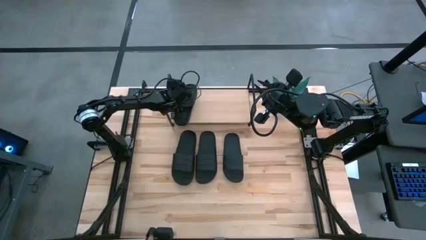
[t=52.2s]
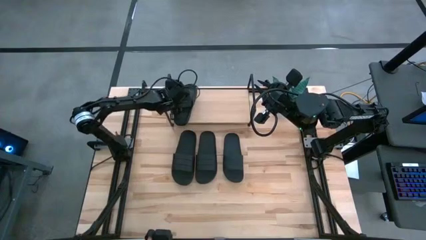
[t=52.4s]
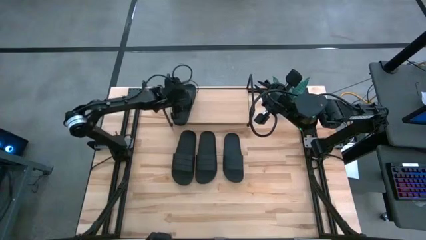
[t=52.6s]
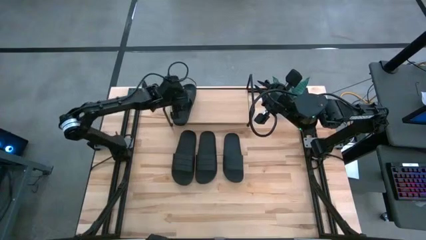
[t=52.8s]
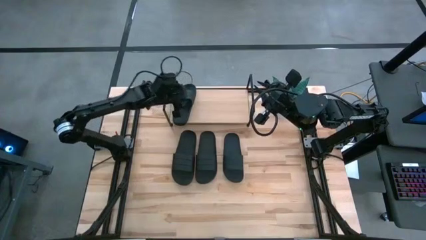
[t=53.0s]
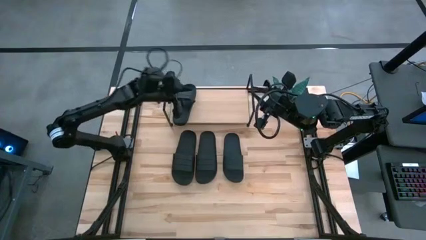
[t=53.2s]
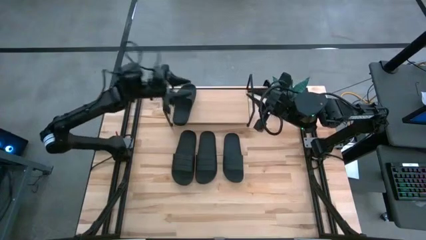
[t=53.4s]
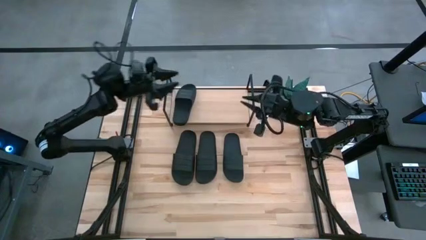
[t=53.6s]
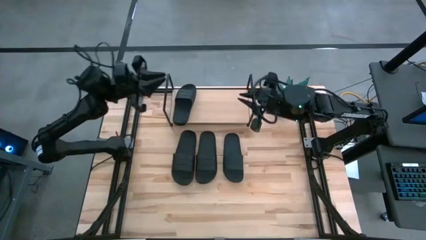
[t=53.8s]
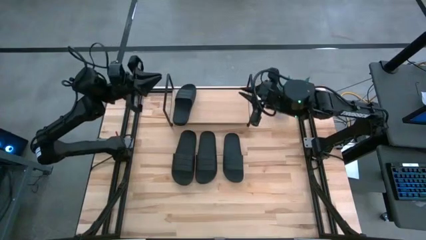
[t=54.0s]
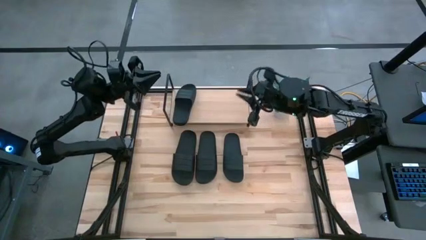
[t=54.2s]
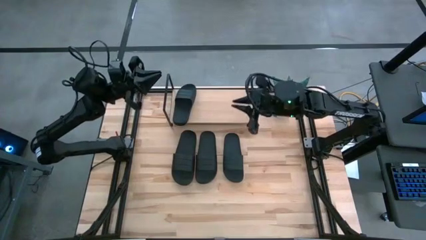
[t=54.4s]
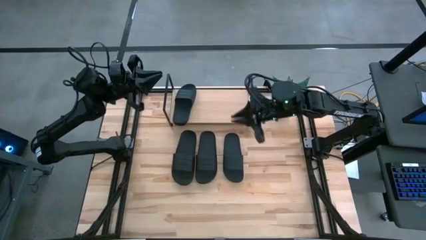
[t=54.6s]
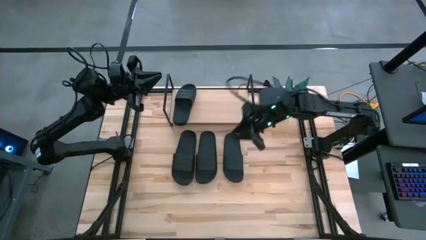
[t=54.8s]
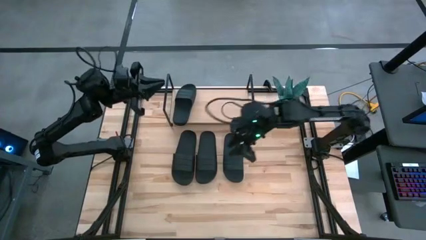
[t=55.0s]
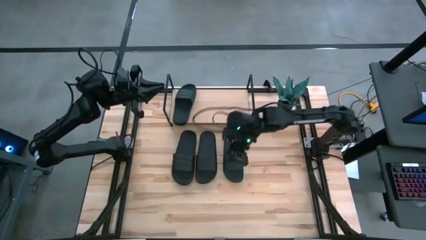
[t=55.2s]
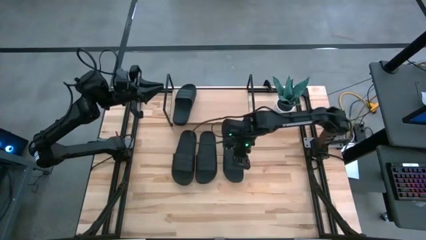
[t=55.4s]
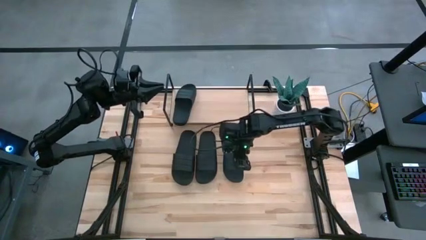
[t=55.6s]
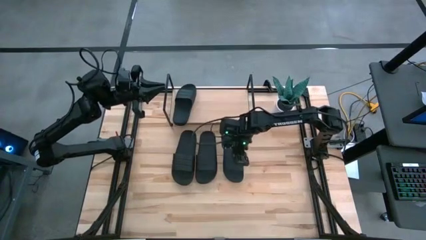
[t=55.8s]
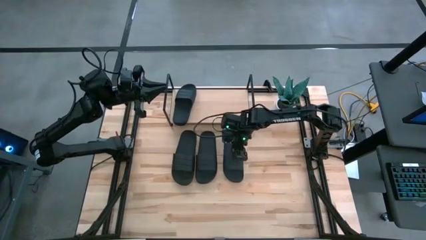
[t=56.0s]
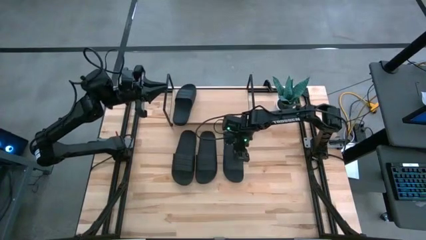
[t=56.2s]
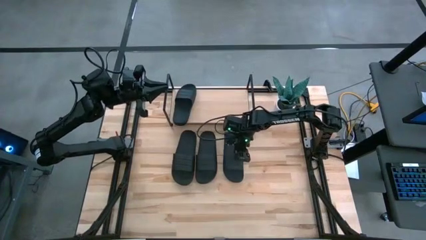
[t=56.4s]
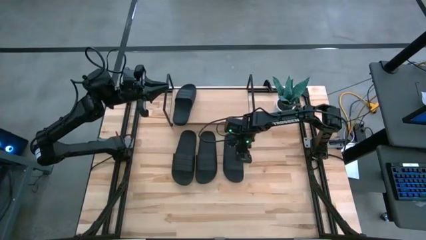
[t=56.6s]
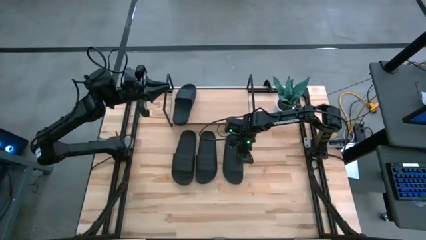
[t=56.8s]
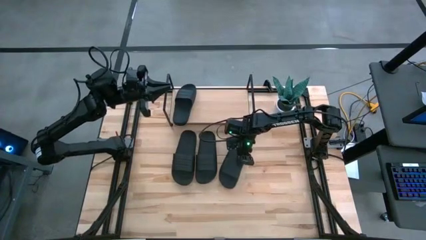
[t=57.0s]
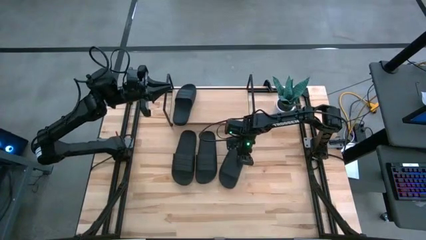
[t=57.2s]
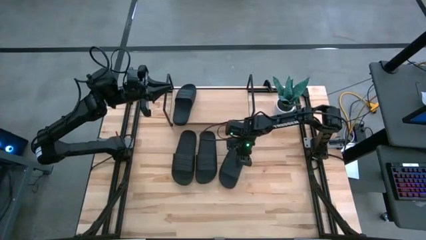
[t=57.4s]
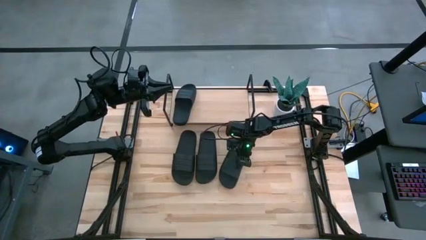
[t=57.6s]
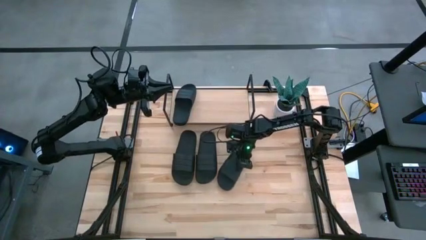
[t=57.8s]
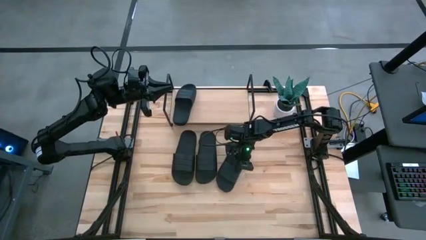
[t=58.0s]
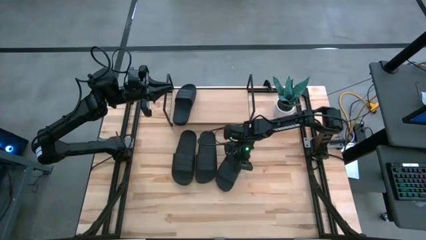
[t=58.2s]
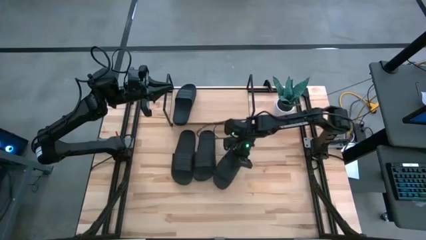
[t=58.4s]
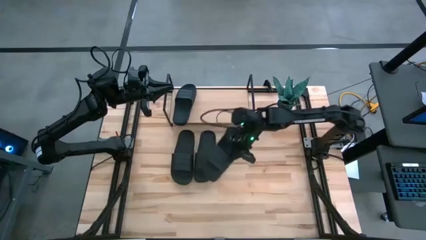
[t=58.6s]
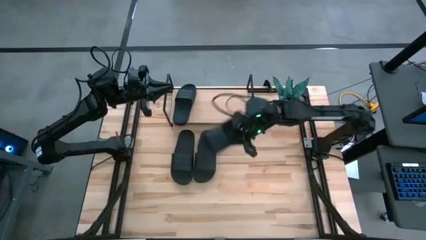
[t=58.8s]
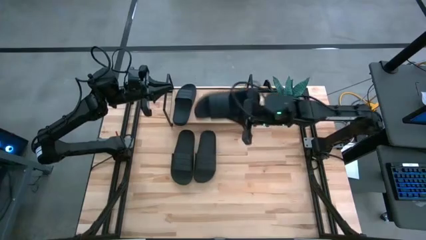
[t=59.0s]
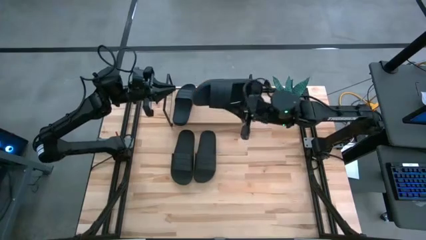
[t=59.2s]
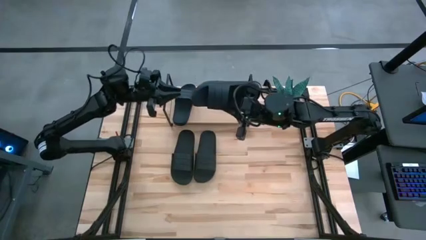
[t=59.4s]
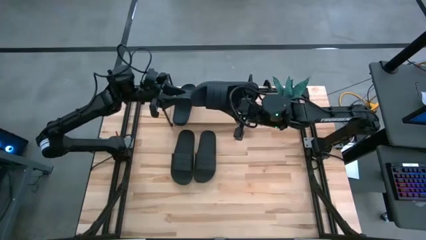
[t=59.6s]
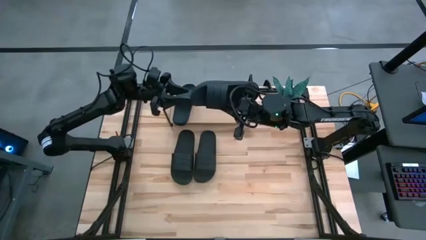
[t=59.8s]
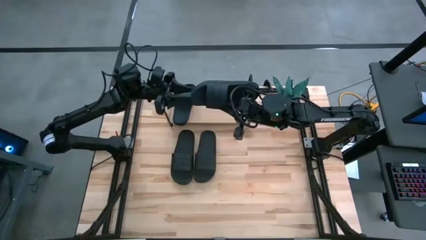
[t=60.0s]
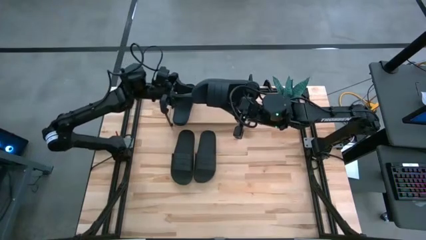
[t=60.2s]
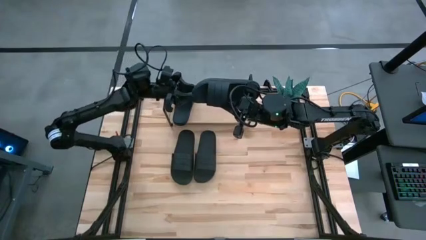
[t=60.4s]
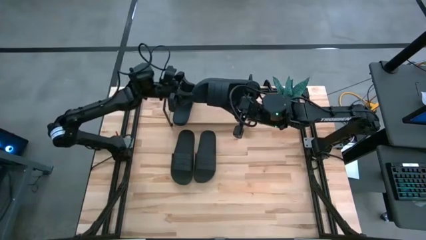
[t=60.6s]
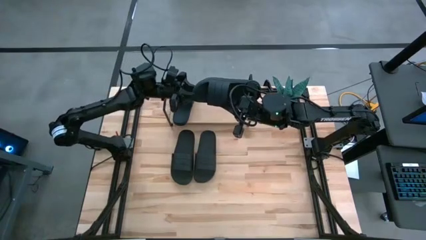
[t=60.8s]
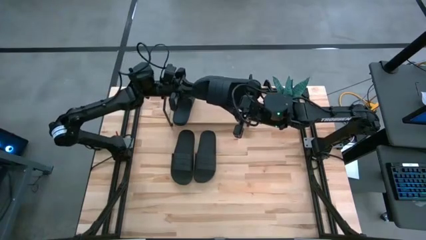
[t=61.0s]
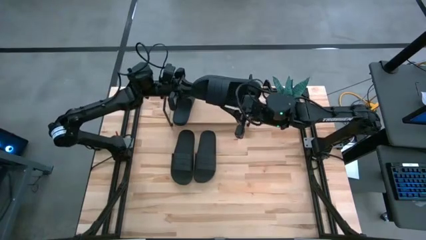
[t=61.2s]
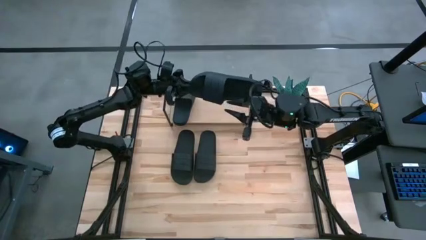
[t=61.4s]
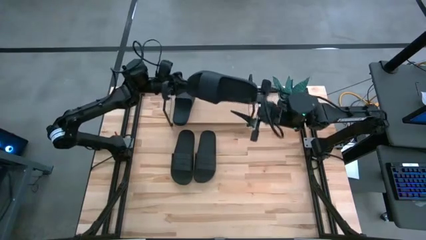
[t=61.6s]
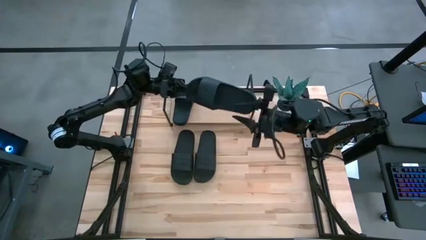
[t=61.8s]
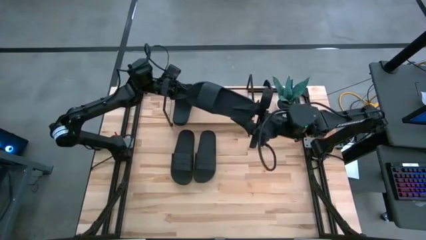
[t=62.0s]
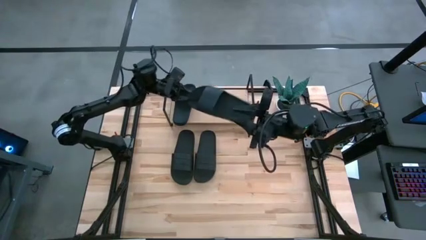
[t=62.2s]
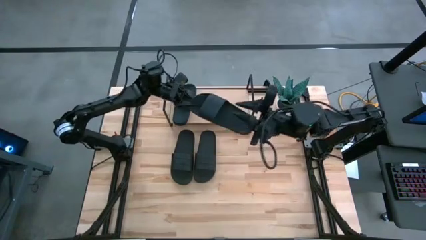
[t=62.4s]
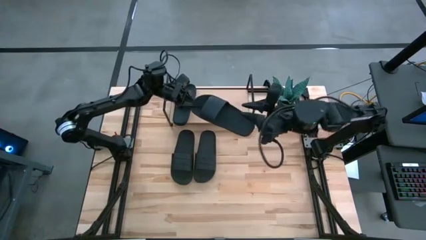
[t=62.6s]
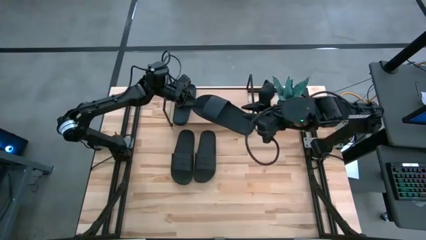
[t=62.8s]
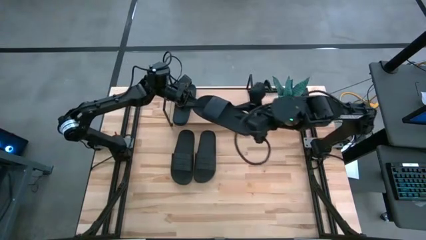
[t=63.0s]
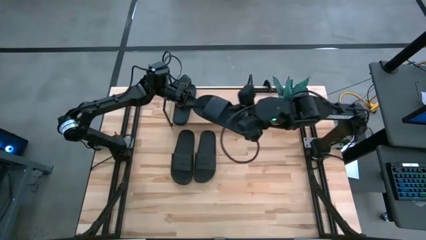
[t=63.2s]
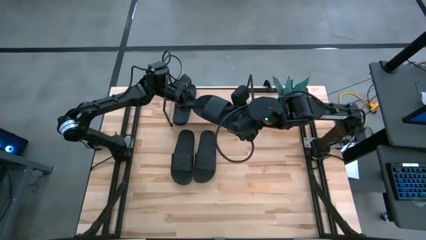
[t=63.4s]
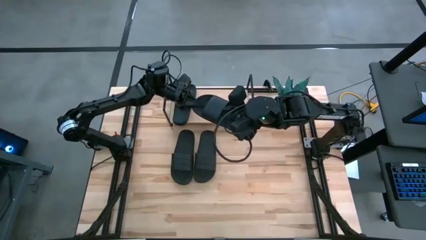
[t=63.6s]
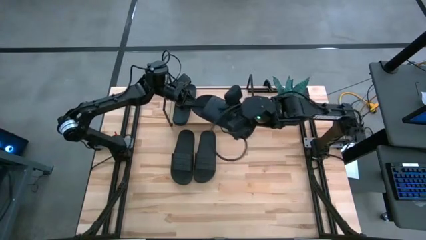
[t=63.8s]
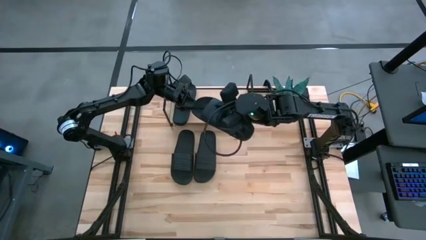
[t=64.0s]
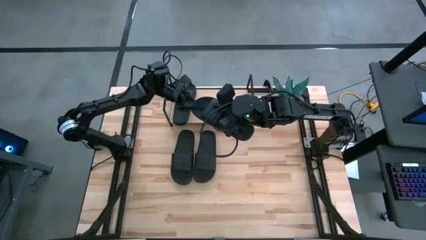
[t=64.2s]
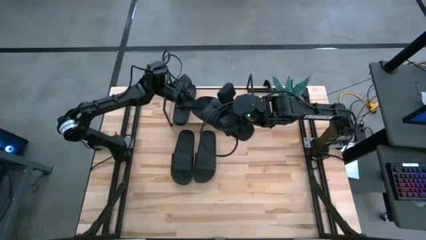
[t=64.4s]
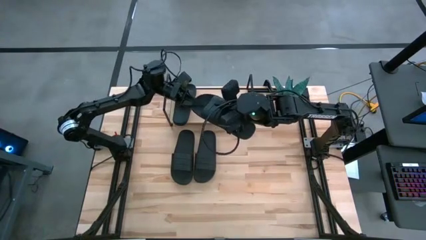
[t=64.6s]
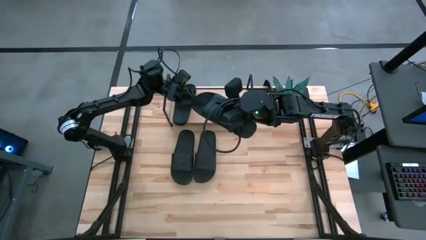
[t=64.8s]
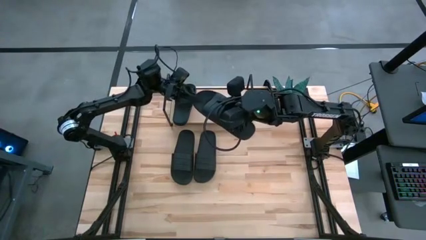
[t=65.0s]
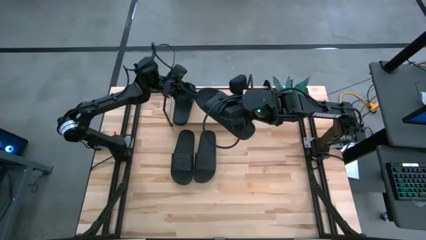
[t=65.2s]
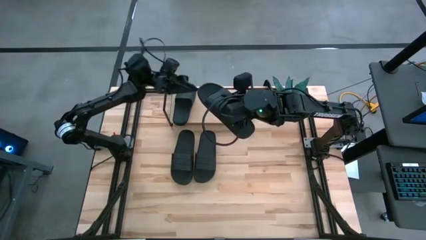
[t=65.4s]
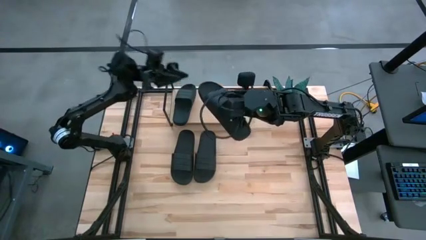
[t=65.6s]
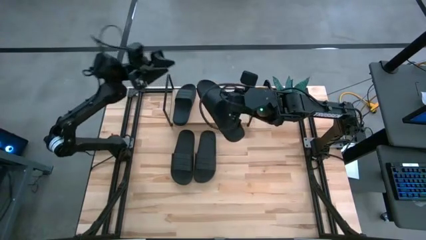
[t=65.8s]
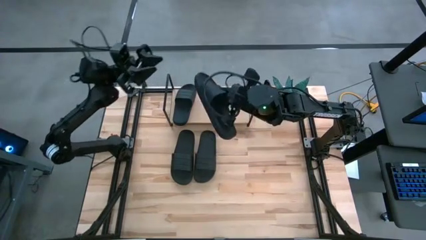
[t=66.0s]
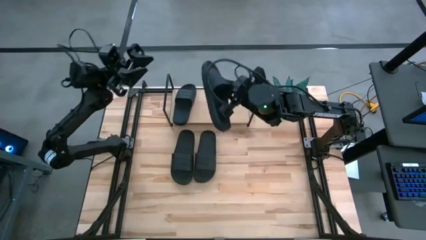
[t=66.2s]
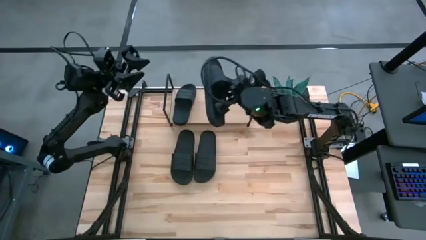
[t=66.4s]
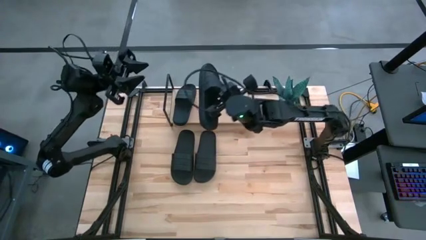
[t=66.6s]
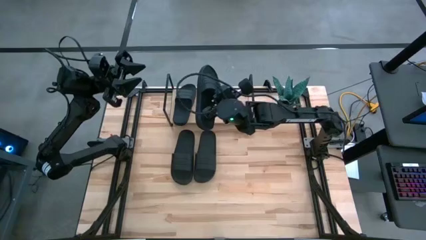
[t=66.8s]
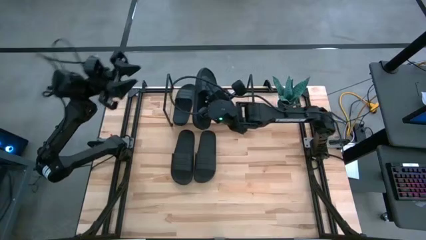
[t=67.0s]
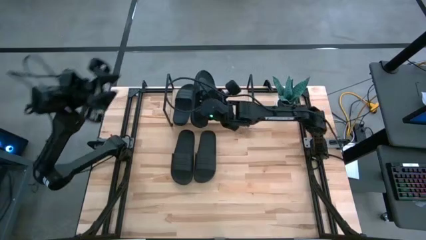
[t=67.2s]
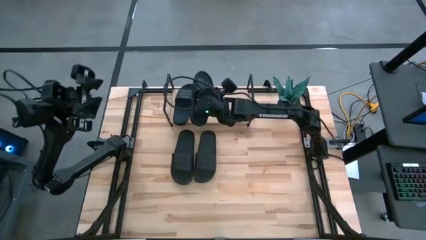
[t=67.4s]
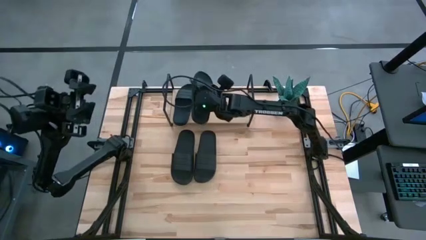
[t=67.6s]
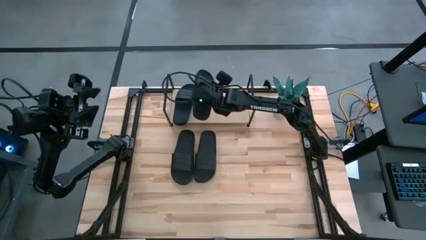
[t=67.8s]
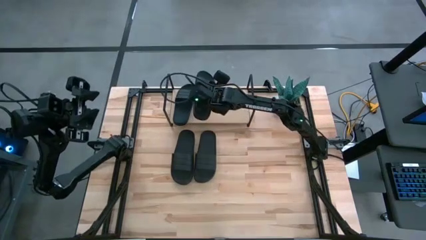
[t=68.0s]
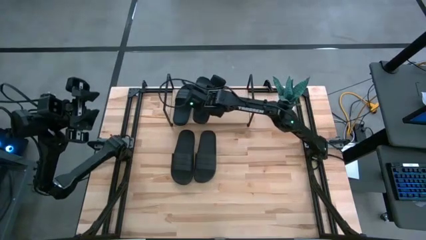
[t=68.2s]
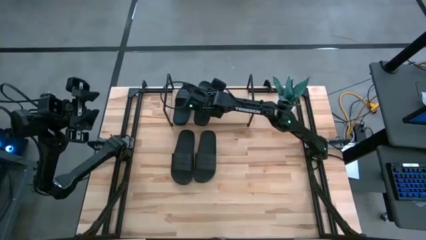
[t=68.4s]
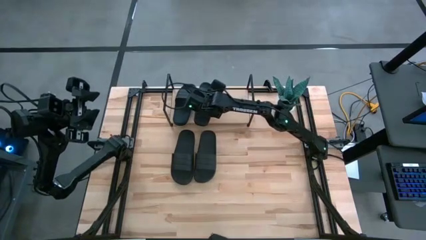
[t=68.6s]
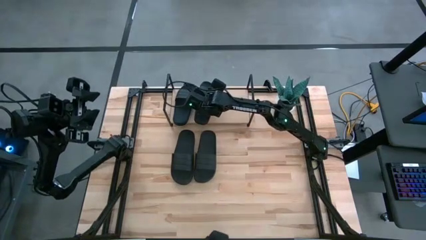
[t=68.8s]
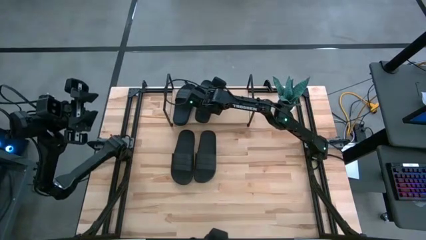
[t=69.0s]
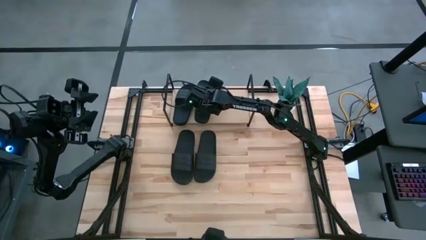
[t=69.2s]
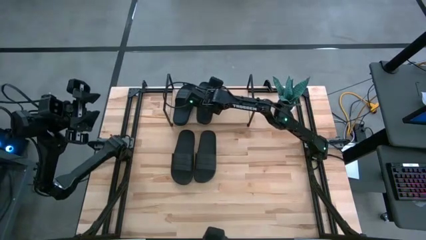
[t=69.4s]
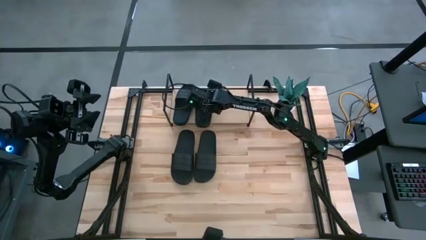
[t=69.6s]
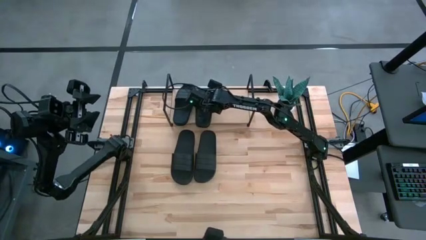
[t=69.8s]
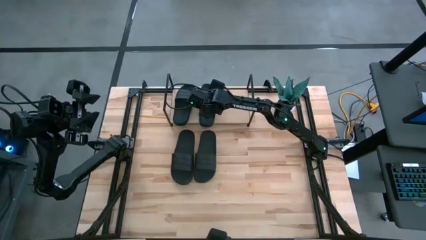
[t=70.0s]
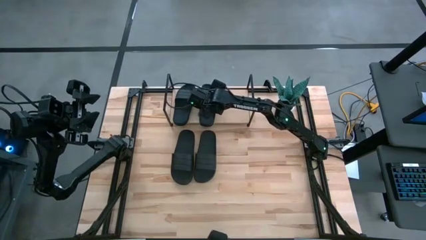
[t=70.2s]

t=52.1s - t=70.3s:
Task: Pick and place slides into the shelf
Put the right black slide on the shelf
